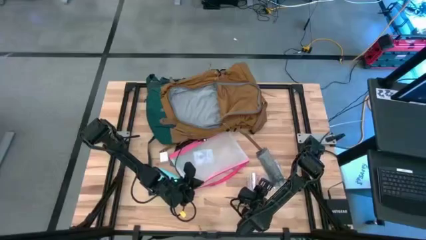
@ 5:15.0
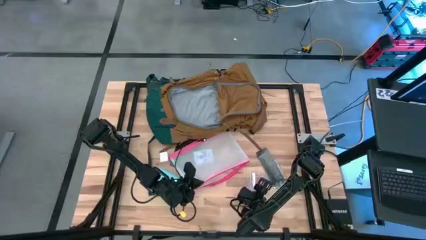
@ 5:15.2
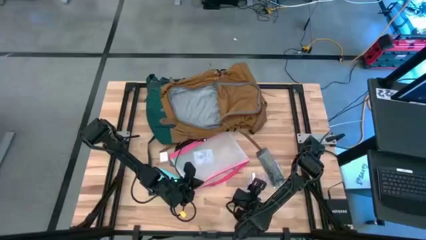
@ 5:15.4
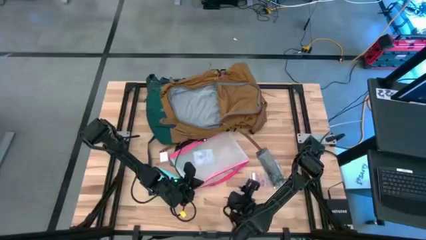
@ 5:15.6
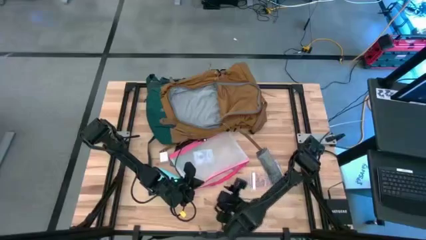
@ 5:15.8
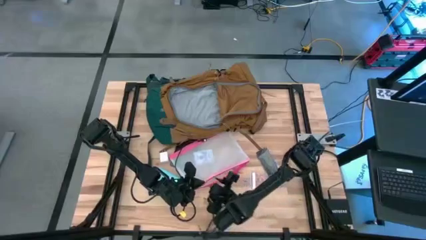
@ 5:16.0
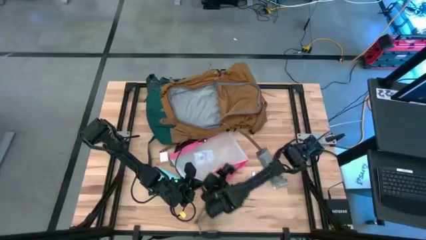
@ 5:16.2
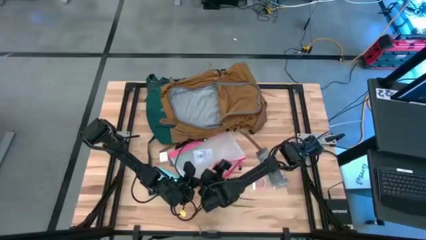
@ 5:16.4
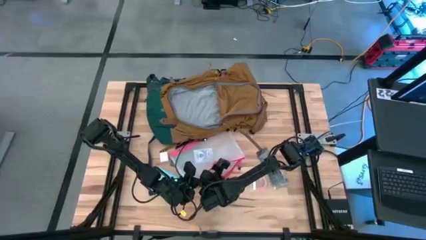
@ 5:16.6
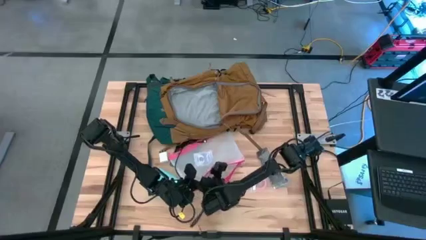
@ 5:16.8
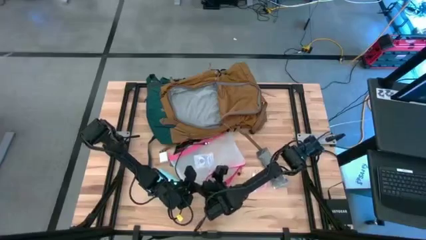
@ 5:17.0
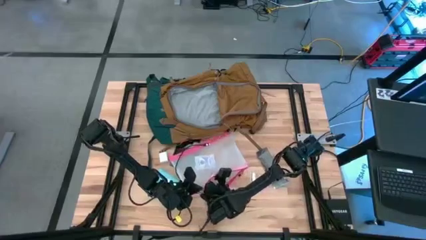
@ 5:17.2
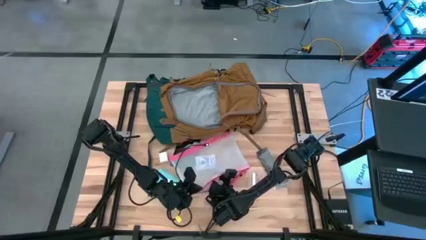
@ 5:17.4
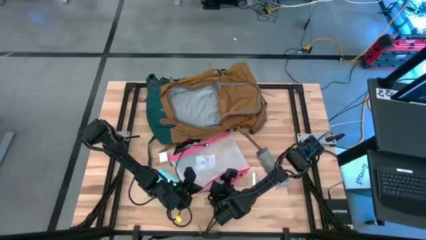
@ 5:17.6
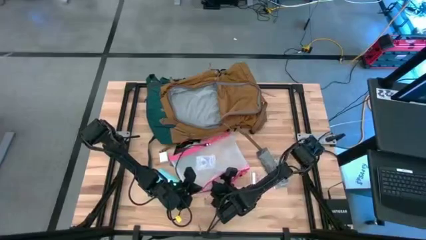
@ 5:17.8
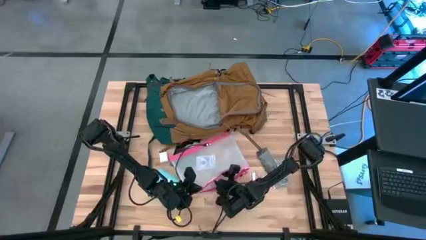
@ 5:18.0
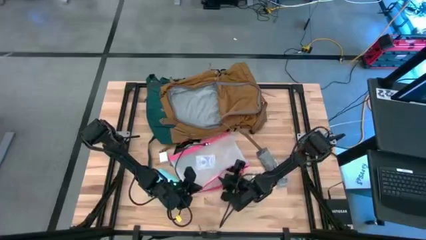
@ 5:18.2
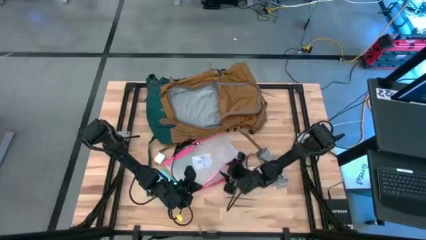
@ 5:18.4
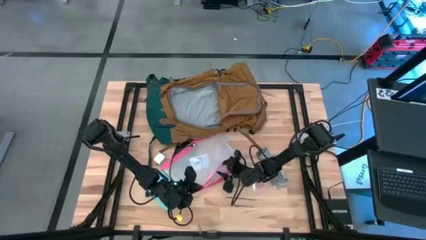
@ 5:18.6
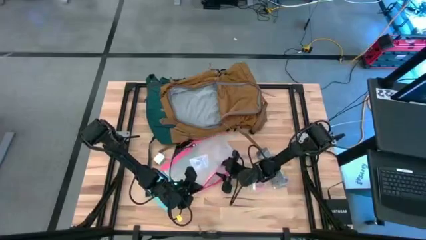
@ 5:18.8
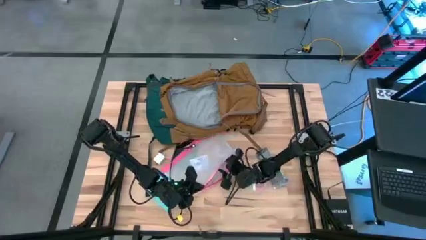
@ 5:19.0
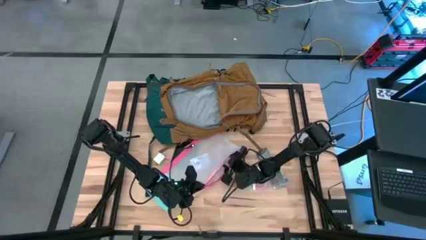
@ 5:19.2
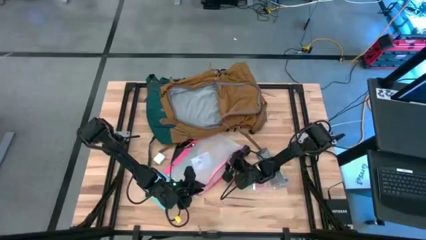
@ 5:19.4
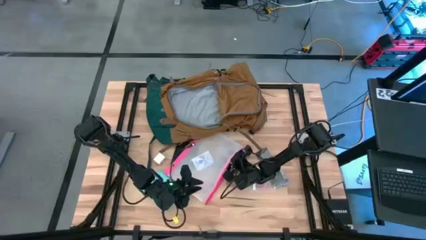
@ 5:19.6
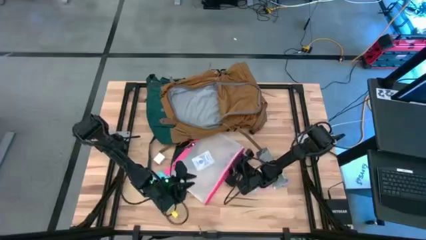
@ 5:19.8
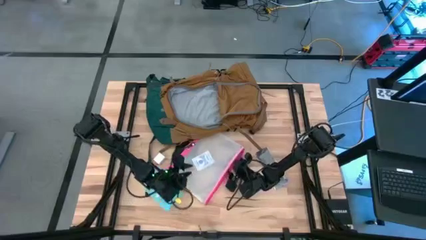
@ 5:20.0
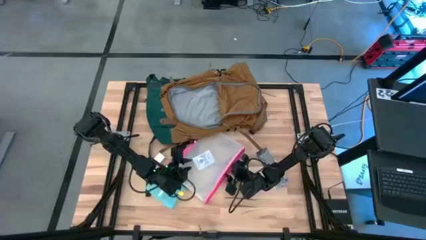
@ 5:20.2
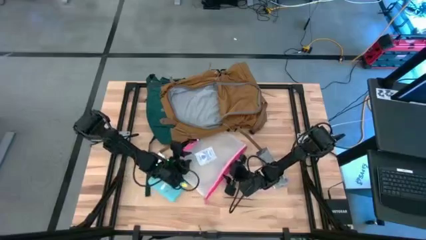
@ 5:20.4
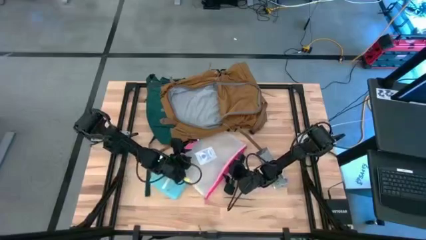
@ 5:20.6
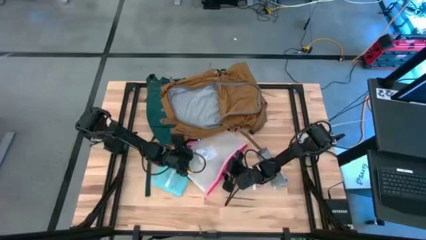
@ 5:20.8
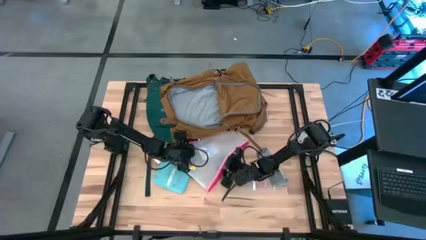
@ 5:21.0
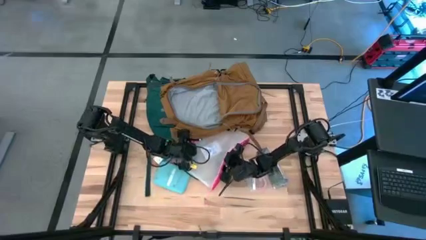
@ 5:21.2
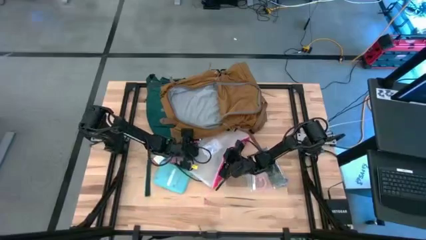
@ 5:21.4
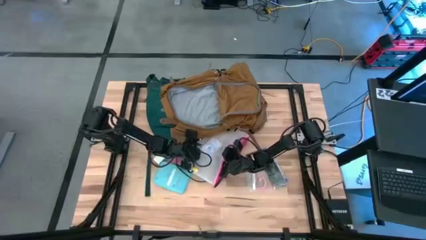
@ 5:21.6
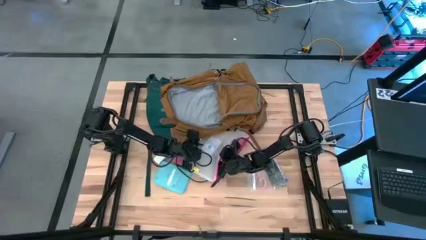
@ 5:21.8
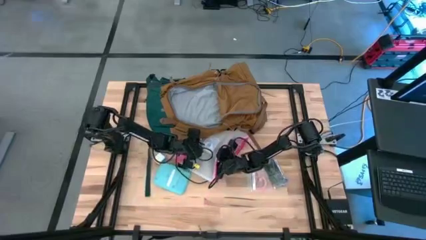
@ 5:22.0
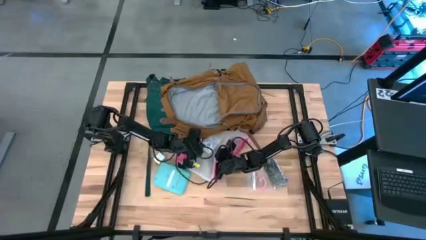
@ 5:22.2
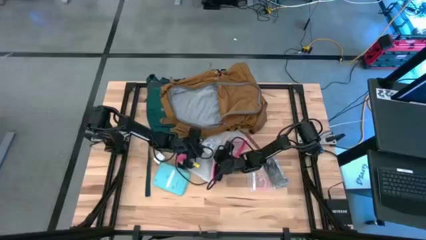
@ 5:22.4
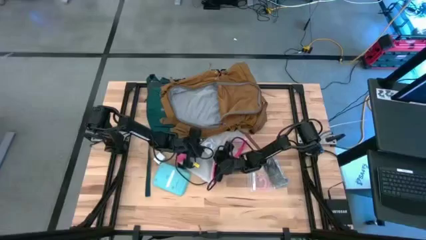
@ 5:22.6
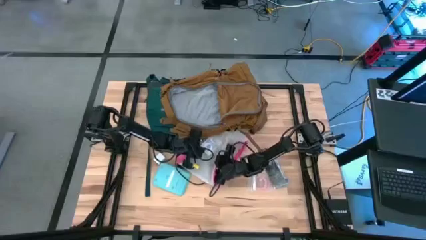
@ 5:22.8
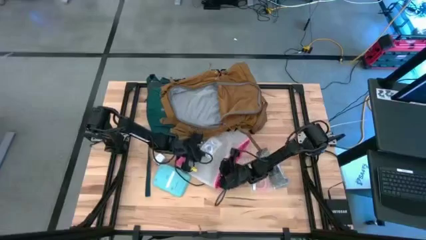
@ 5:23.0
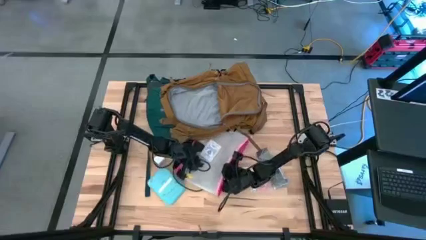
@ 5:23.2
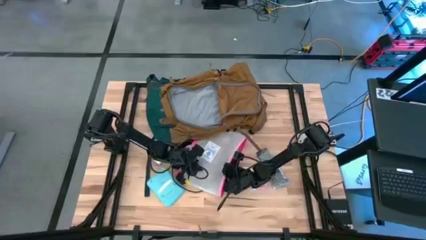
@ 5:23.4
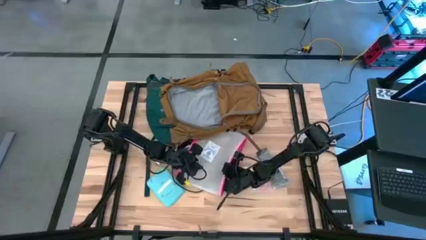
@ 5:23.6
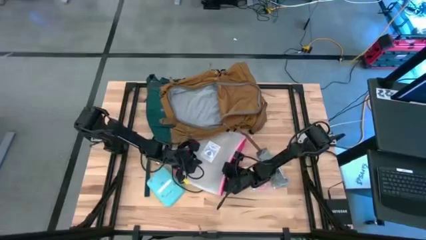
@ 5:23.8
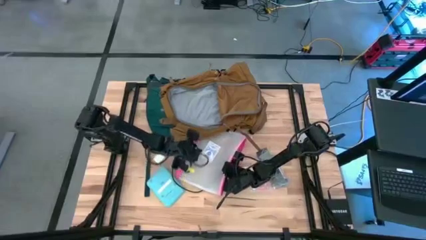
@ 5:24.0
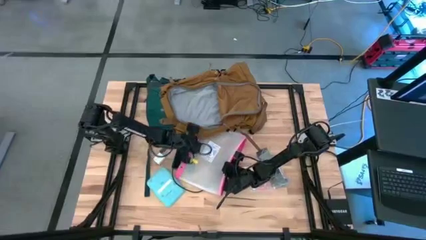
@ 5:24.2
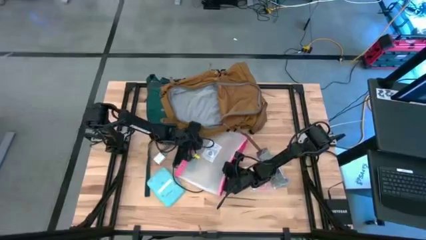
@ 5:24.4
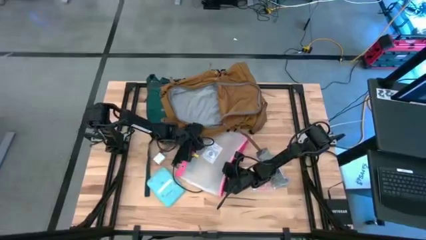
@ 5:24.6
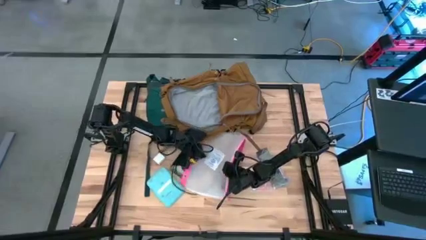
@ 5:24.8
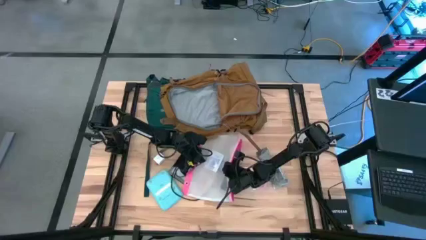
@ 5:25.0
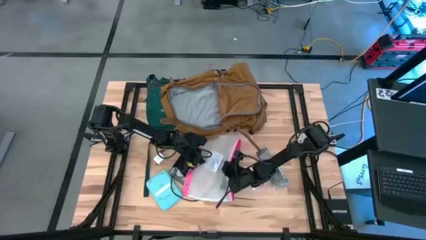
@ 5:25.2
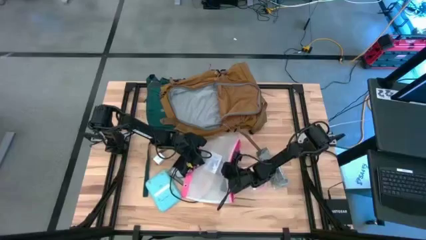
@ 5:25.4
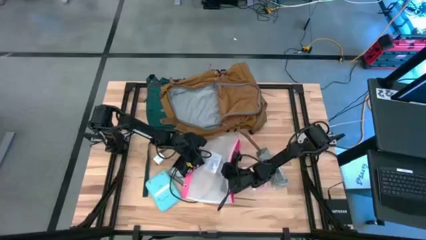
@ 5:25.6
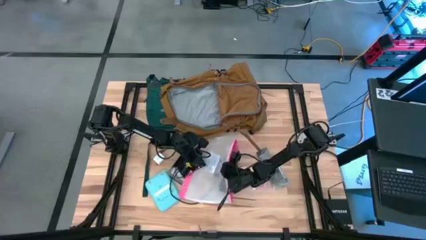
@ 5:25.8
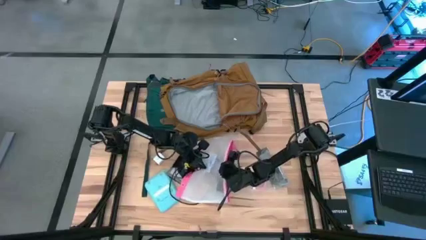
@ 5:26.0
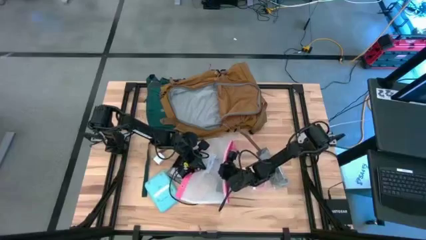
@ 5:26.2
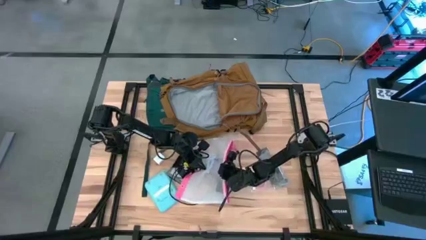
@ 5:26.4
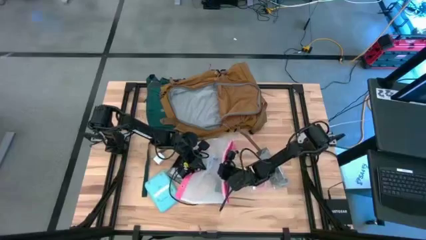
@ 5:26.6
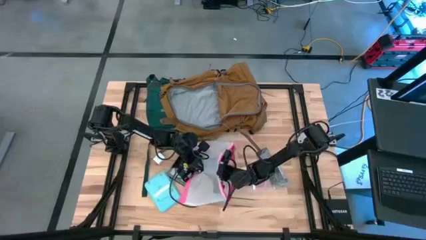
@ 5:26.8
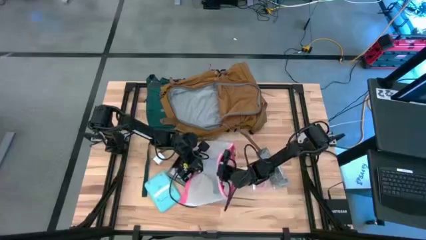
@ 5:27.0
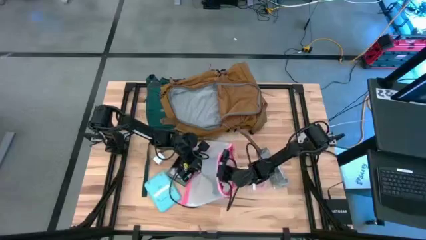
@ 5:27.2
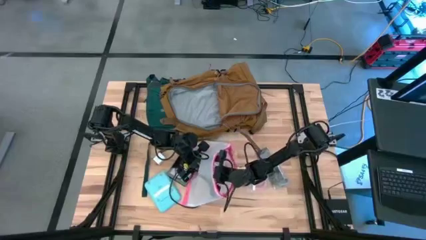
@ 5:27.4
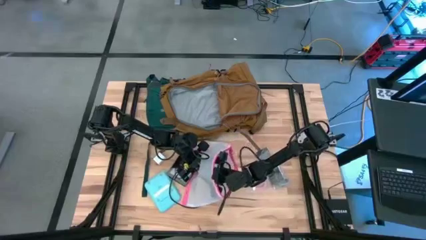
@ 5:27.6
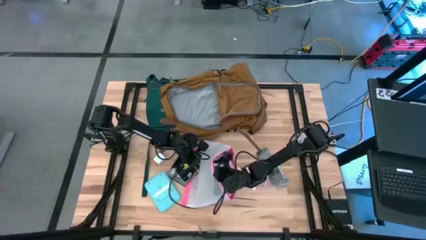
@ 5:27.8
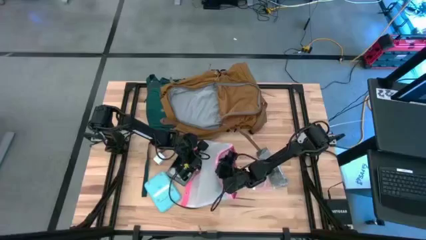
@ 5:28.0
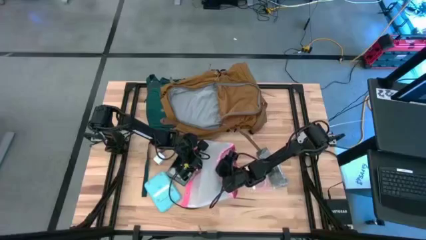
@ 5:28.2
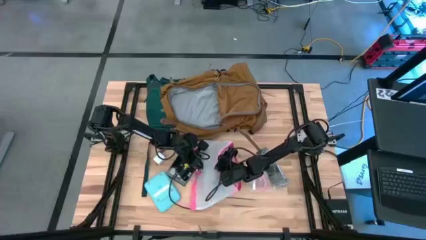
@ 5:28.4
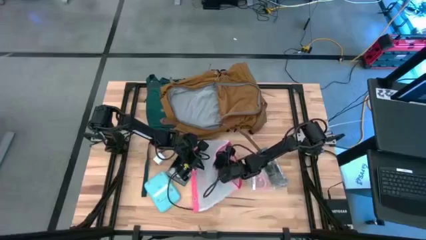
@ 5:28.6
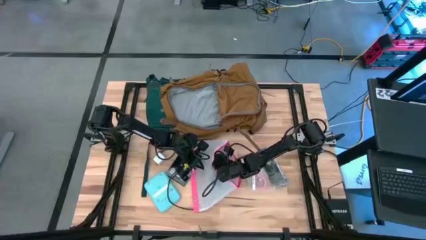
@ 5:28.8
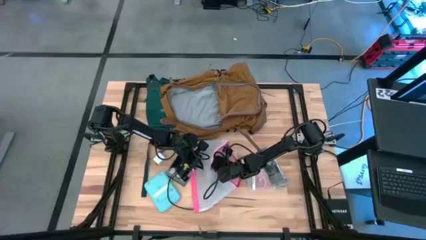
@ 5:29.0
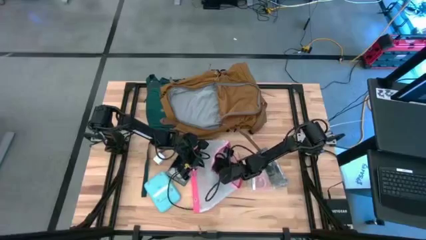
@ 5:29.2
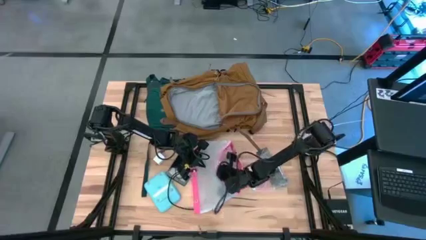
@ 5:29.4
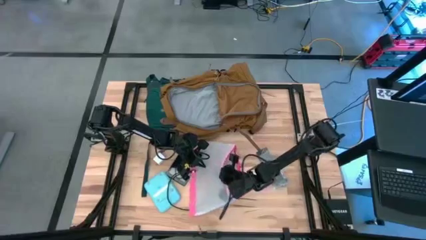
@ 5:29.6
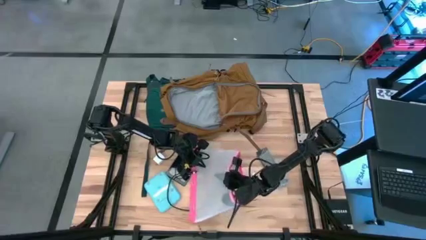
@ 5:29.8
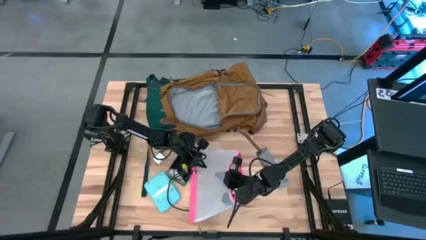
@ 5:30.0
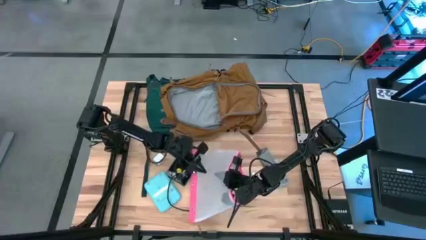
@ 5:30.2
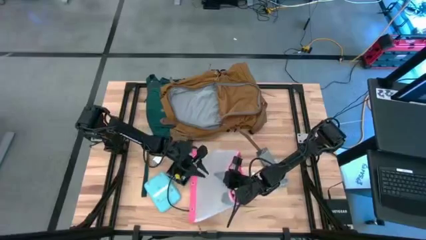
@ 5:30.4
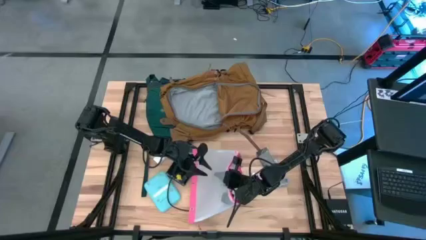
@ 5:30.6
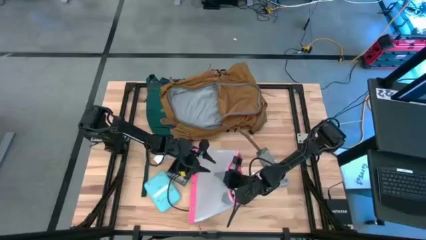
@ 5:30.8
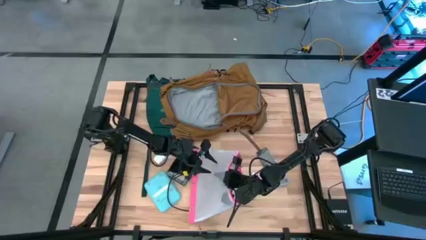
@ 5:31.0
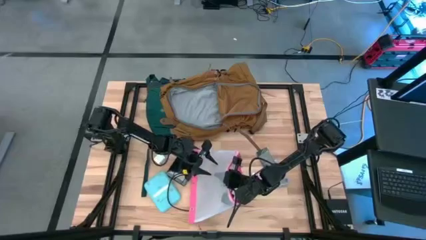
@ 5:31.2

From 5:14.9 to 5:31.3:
Task: Unpack backpack
Remove the blue playing cards from the pink zipper pouch
